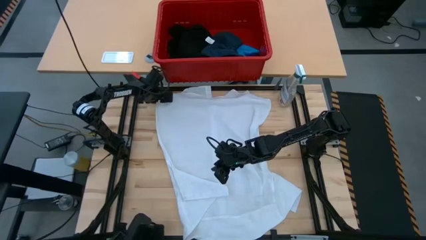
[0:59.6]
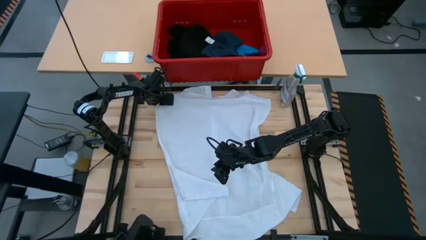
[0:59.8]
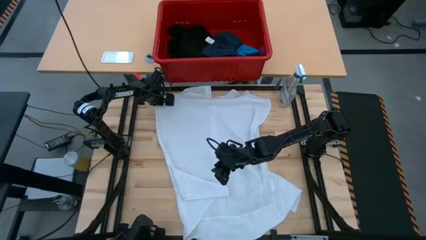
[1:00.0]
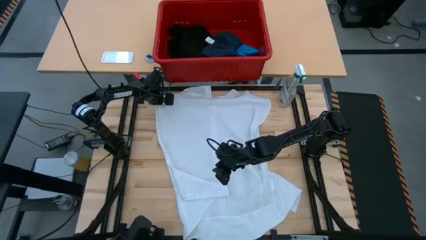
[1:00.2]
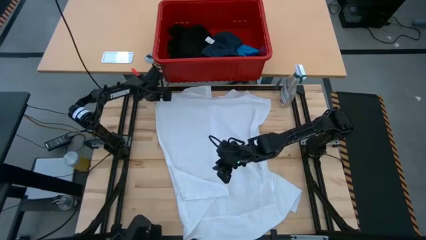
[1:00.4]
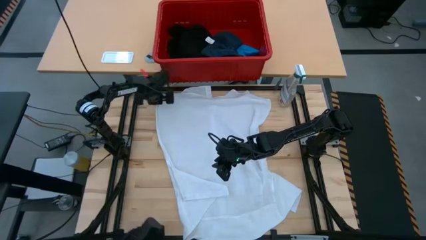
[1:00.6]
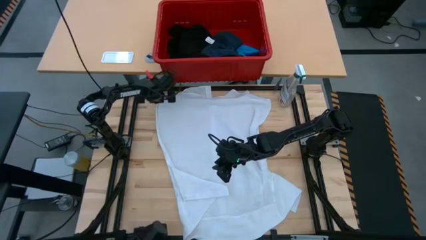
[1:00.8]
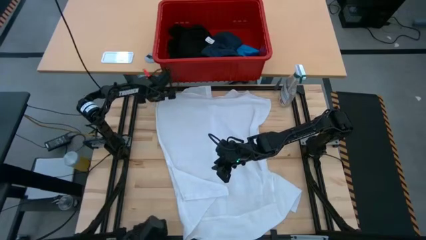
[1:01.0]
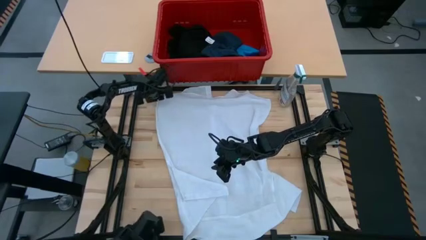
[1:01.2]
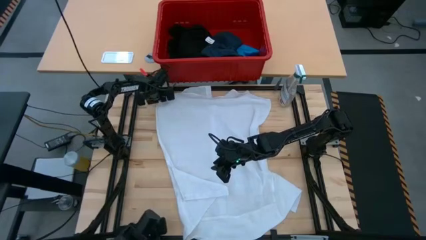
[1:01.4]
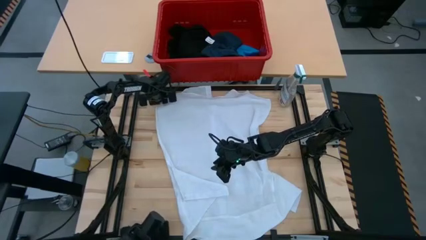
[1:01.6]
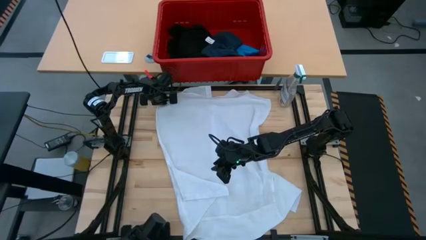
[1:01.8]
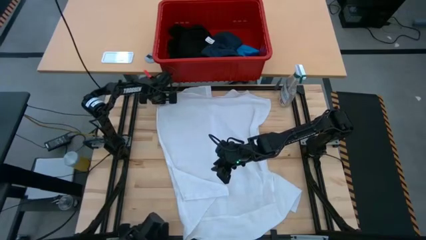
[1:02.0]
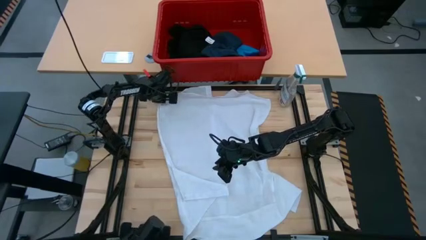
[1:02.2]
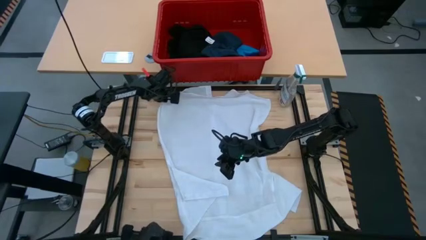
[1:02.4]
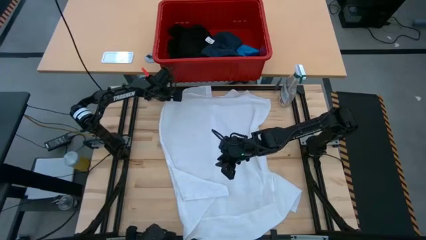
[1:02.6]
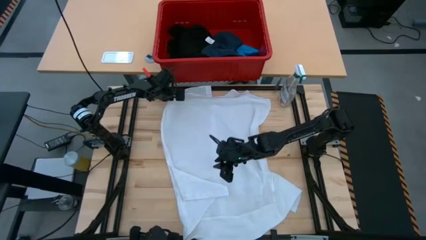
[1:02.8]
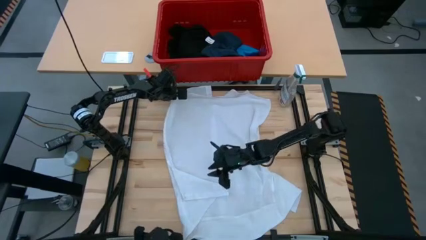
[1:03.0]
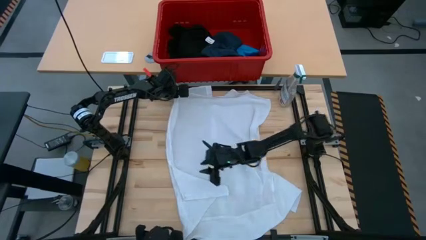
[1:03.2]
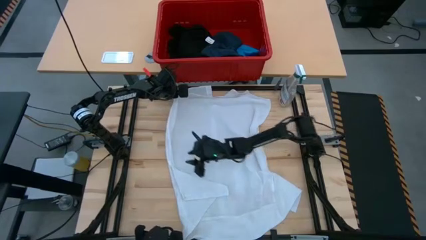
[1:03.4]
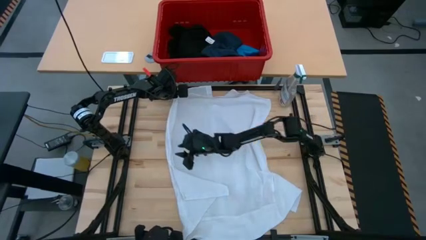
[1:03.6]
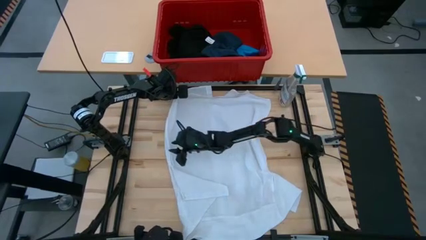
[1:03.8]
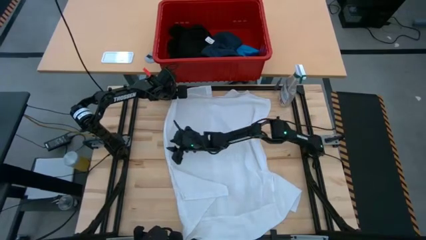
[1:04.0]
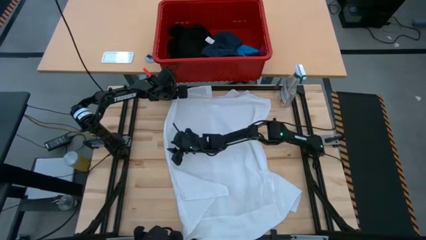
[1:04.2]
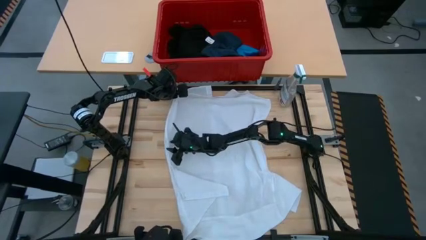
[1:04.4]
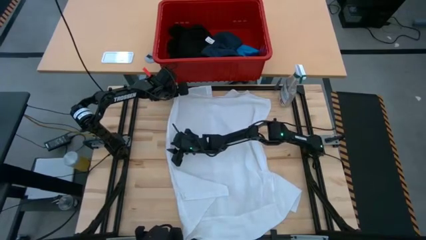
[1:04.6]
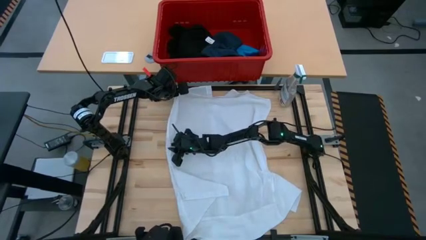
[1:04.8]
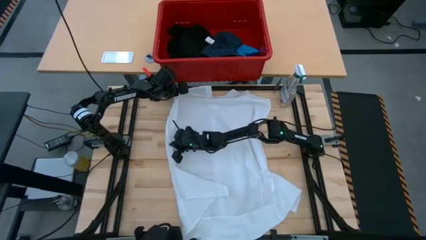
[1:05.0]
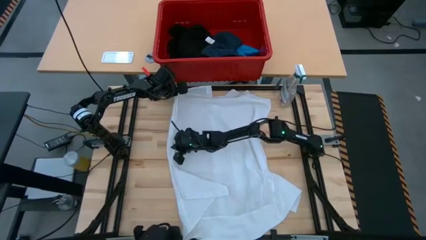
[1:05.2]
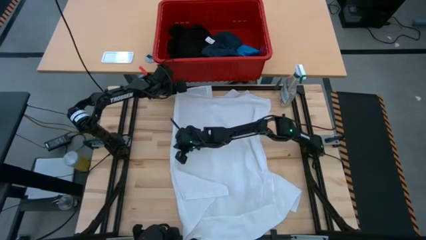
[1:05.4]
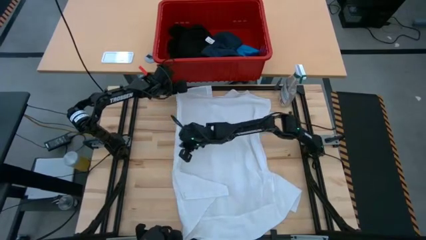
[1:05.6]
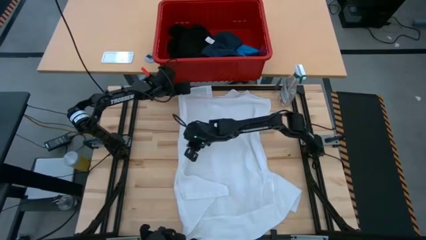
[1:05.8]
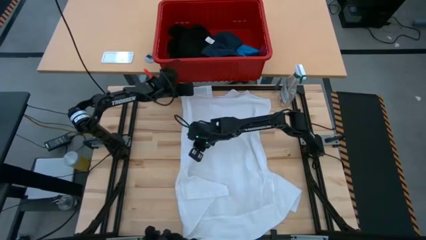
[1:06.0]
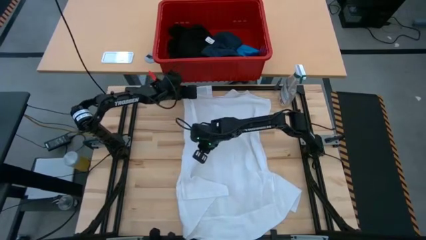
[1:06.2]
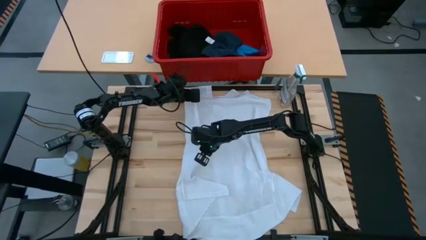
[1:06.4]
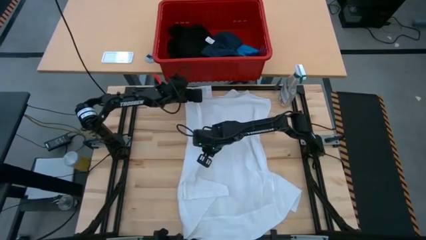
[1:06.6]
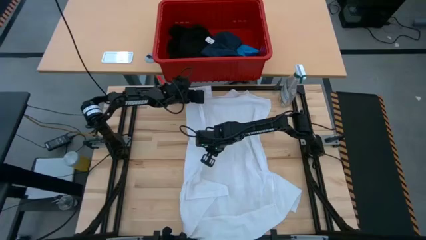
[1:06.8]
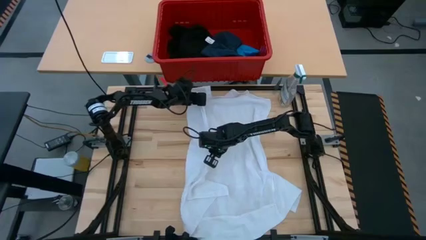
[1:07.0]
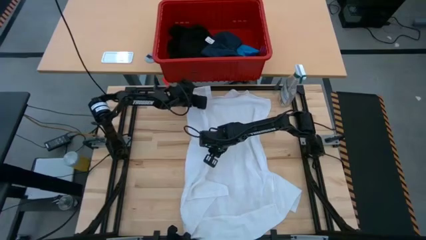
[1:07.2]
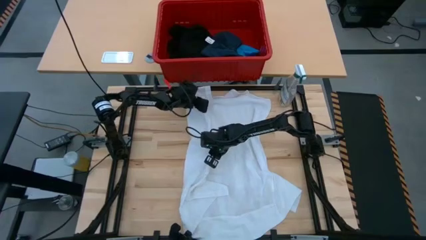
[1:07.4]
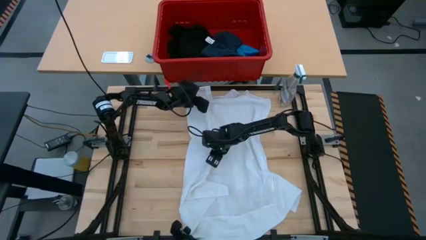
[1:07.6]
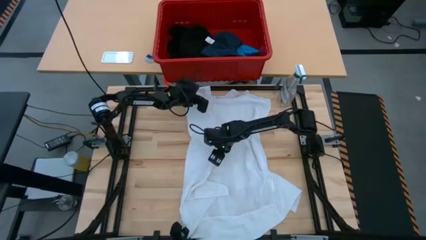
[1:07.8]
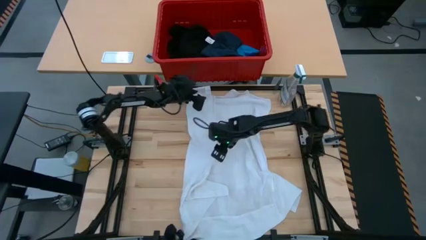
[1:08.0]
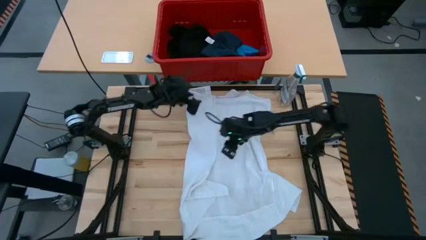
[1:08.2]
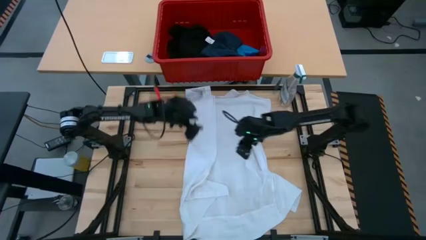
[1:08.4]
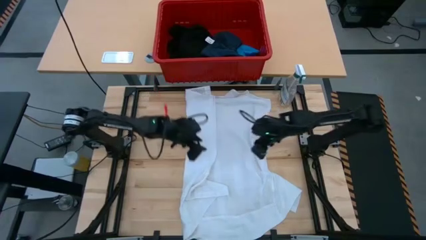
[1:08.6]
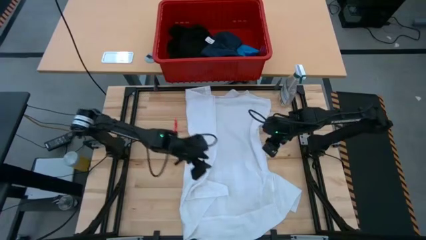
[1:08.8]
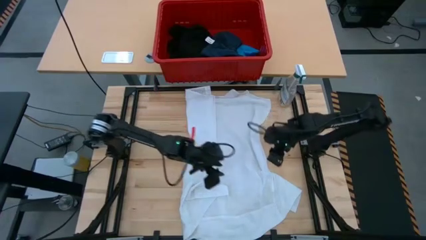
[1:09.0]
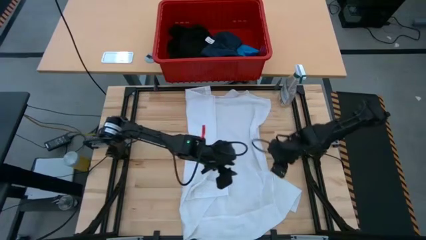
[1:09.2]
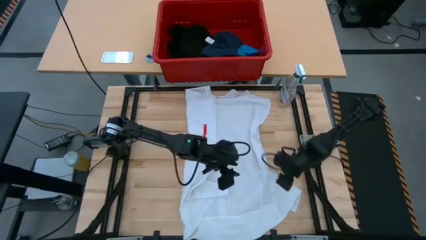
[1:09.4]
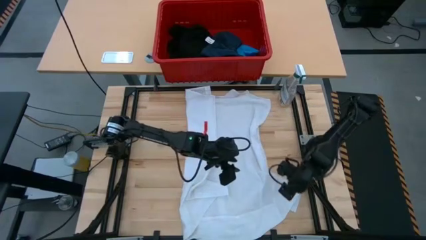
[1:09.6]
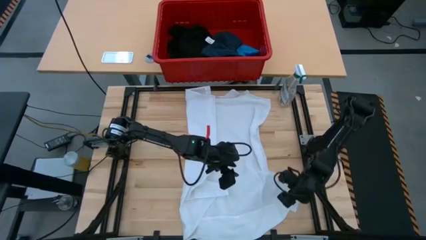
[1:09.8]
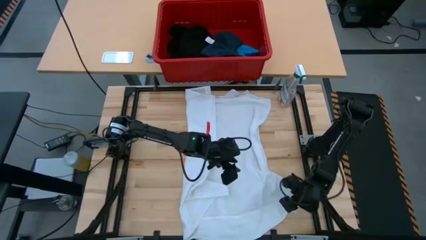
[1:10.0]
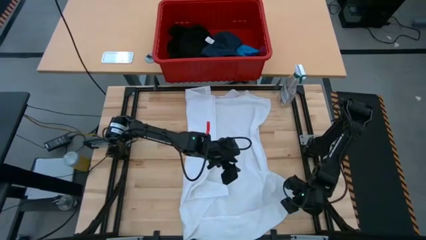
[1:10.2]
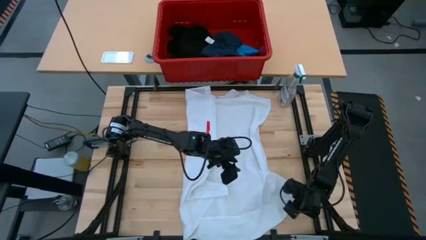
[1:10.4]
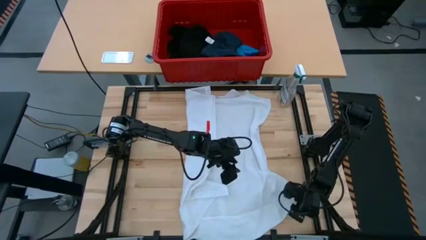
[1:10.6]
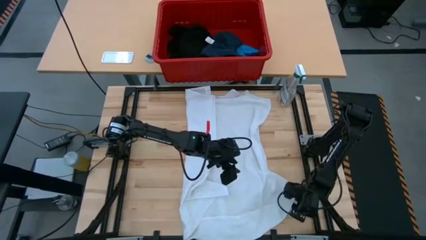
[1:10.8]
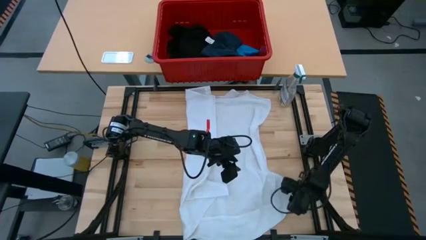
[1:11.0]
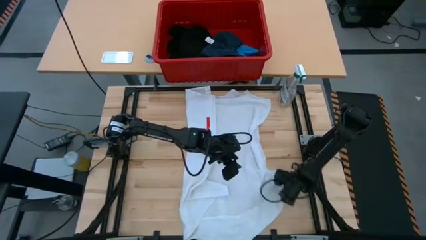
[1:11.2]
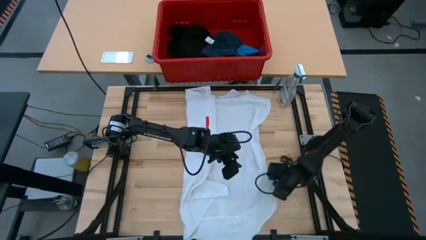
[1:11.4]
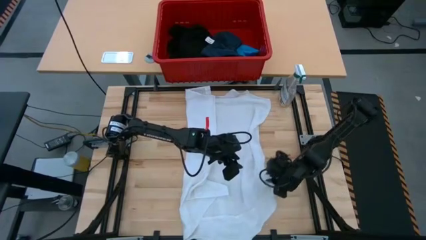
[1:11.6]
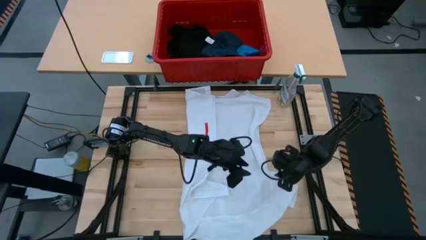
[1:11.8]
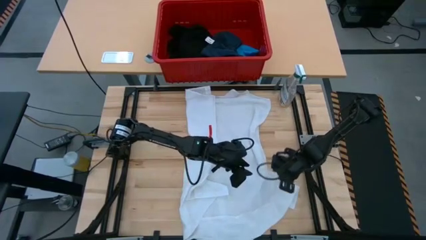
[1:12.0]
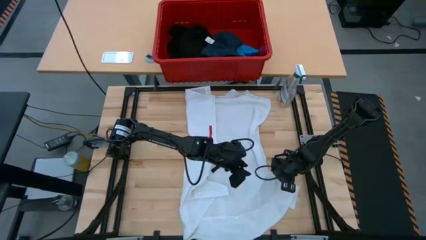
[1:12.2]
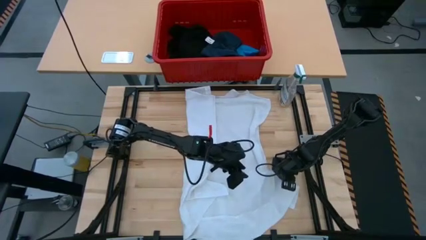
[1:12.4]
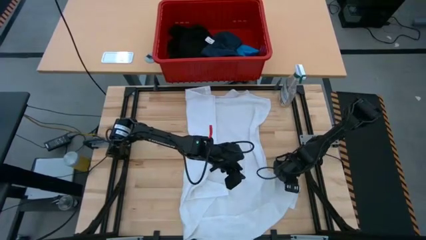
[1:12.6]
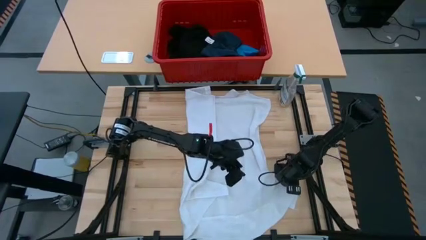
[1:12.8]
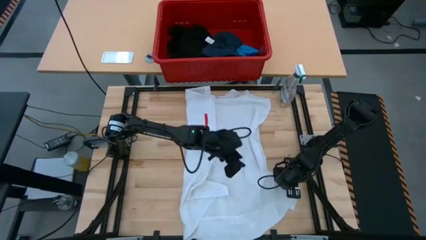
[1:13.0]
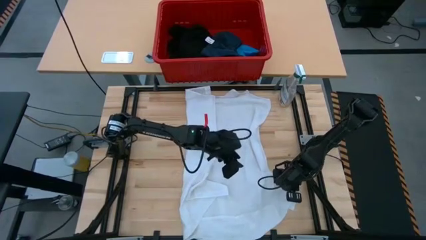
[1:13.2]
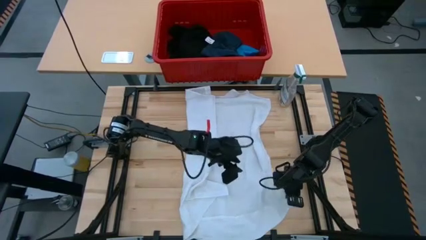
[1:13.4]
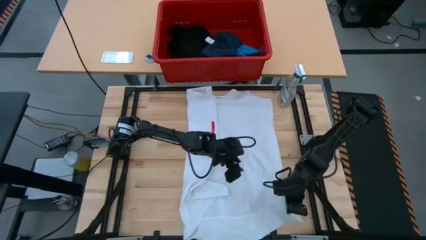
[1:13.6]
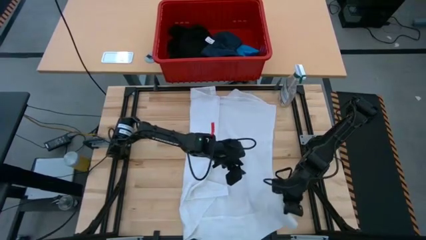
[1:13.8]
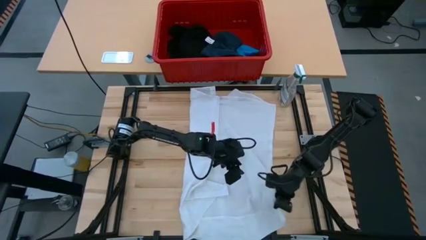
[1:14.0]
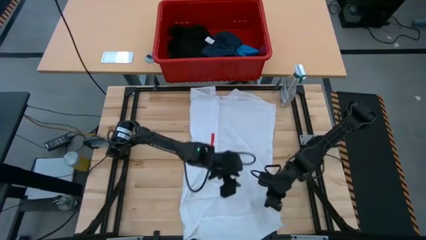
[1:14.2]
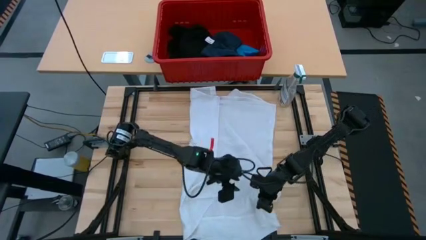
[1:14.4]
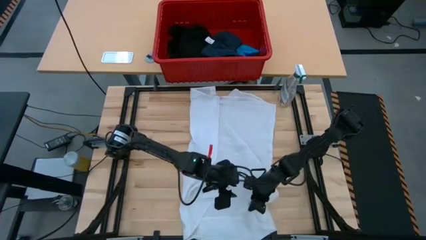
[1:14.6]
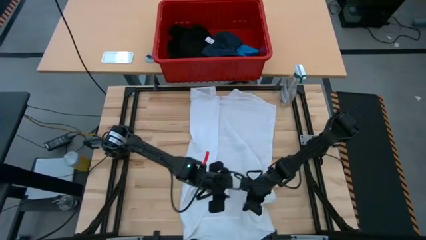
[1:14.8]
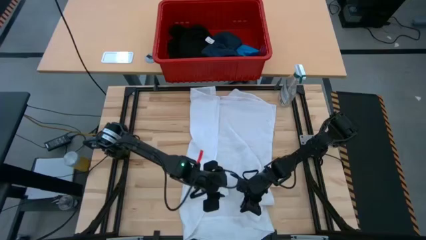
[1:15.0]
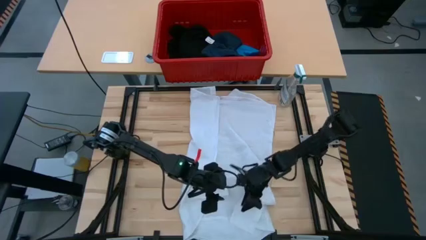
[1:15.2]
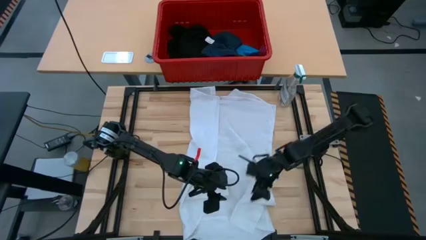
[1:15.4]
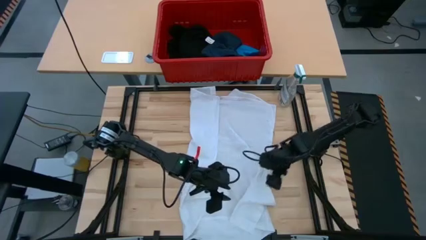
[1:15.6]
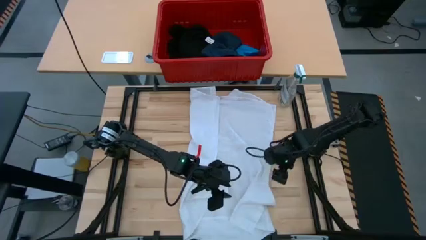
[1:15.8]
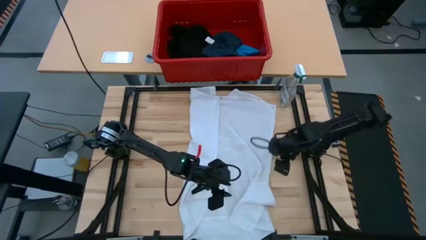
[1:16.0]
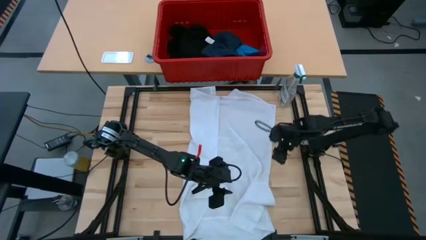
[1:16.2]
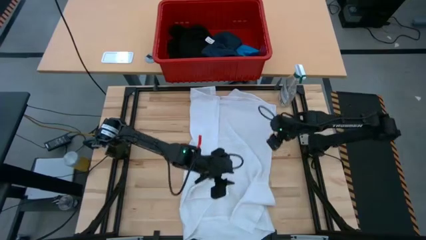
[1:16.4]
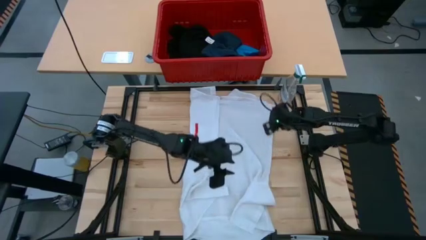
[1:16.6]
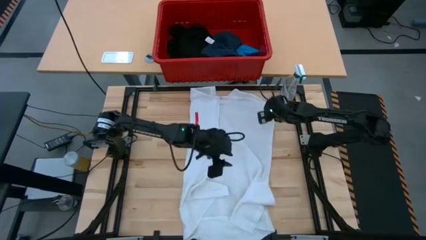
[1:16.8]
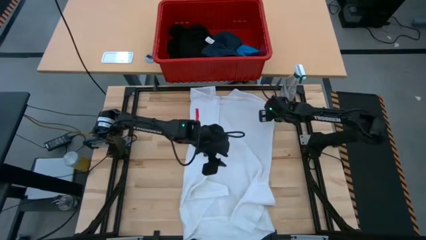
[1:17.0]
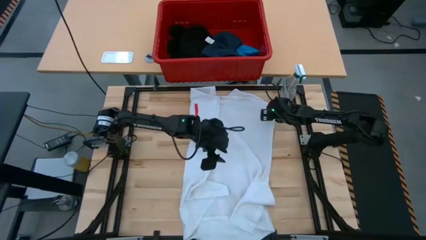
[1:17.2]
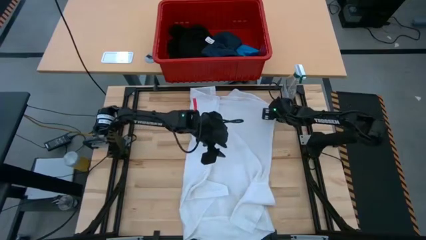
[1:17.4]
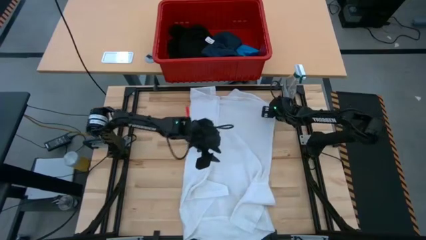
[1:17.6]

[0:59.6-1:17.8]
Task: Fold Laundry from Bin
Fold the white polo shirt
